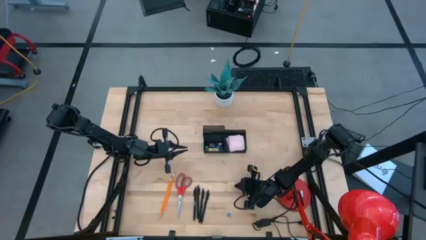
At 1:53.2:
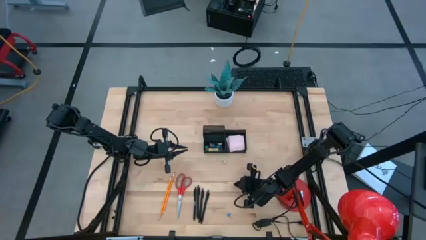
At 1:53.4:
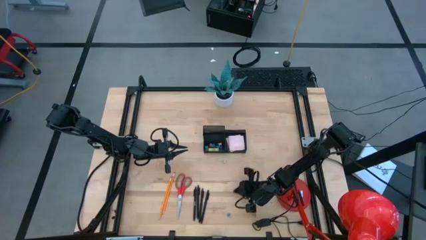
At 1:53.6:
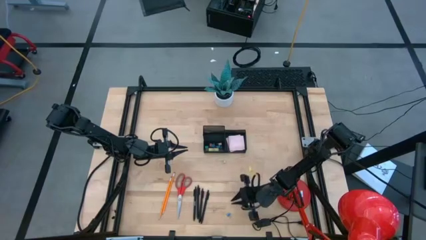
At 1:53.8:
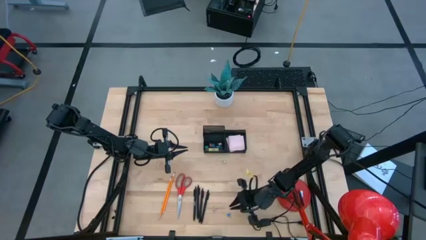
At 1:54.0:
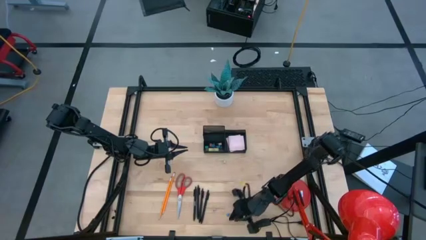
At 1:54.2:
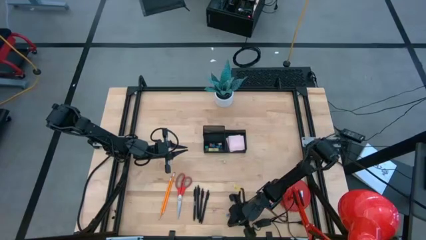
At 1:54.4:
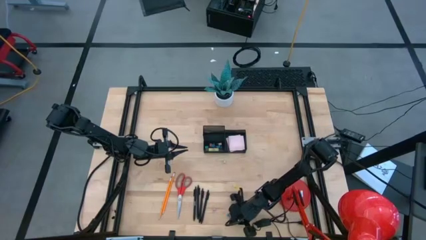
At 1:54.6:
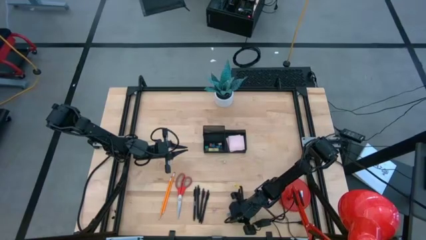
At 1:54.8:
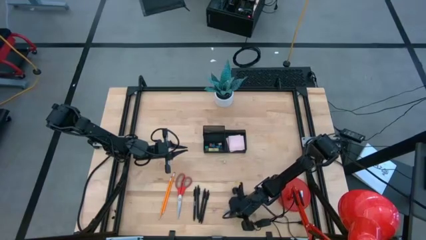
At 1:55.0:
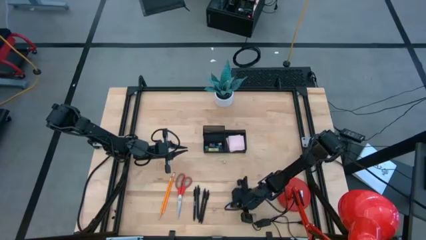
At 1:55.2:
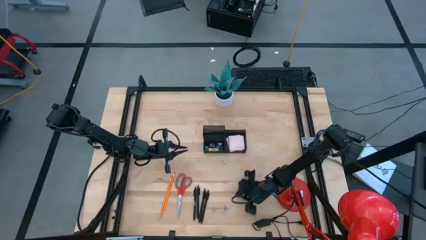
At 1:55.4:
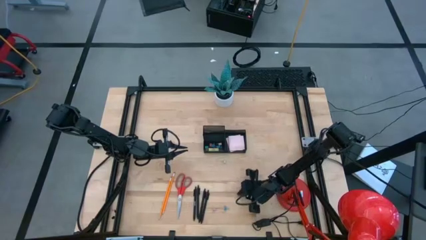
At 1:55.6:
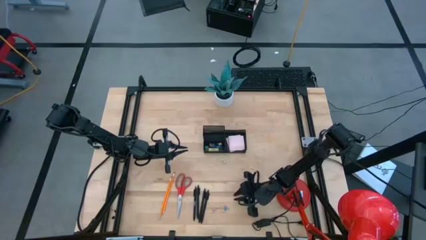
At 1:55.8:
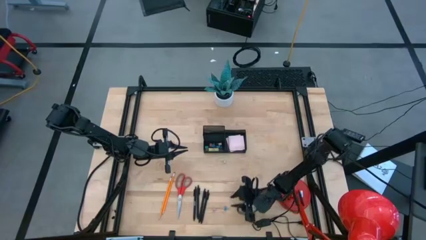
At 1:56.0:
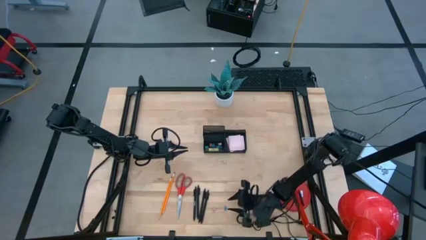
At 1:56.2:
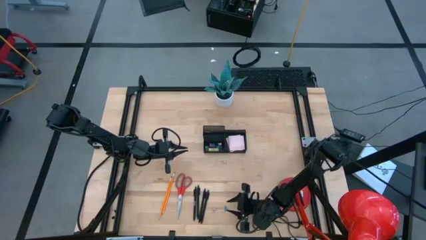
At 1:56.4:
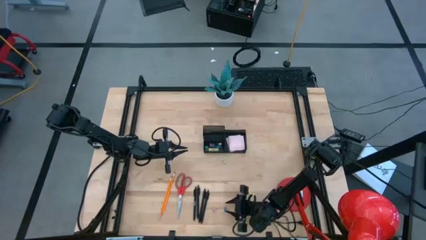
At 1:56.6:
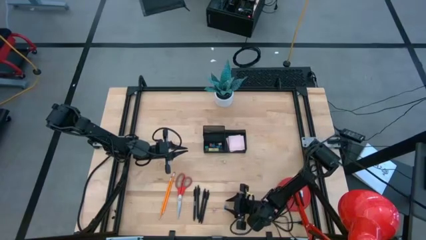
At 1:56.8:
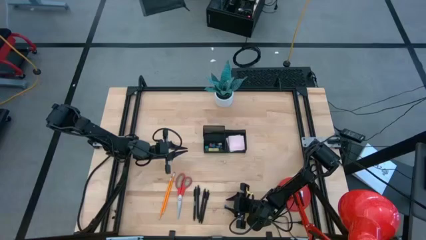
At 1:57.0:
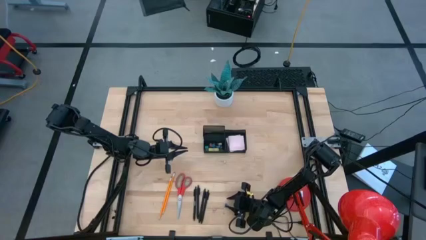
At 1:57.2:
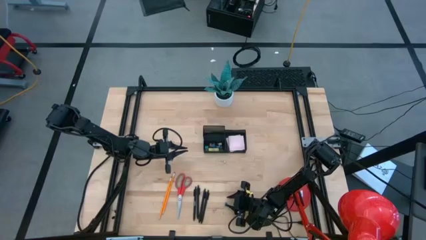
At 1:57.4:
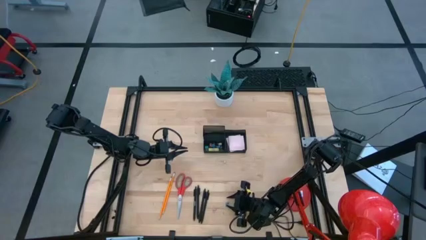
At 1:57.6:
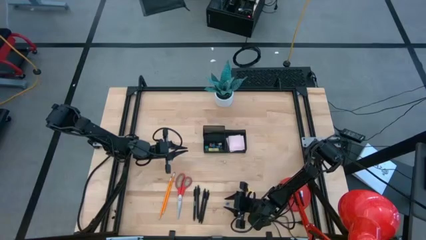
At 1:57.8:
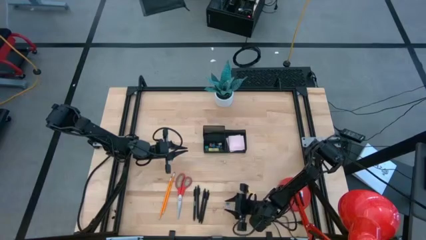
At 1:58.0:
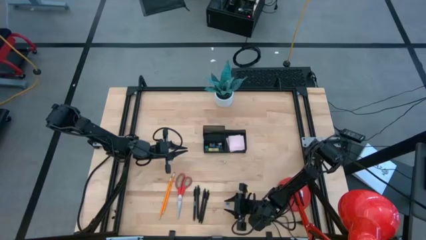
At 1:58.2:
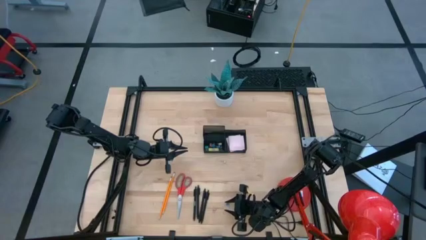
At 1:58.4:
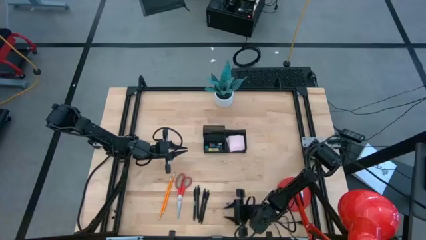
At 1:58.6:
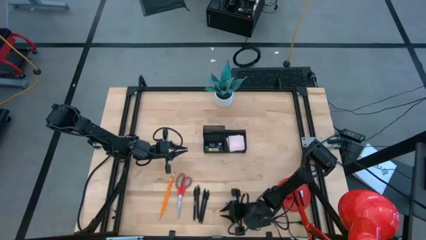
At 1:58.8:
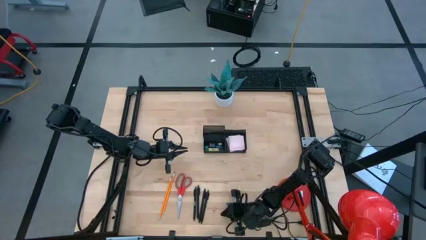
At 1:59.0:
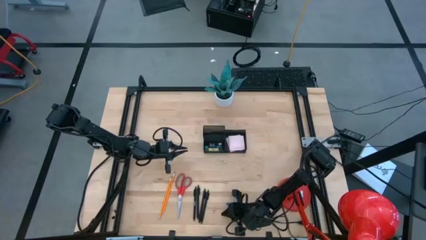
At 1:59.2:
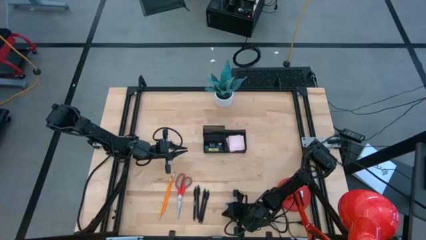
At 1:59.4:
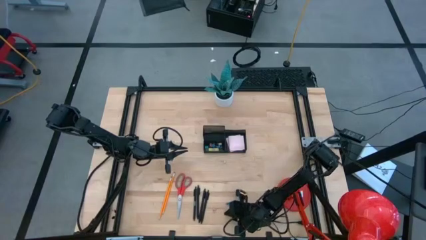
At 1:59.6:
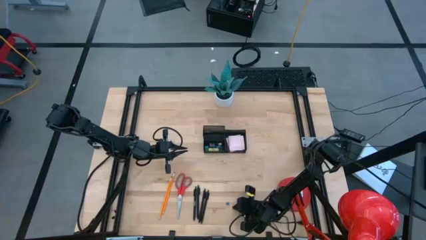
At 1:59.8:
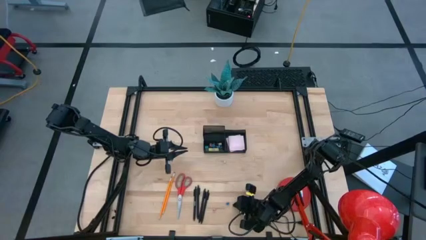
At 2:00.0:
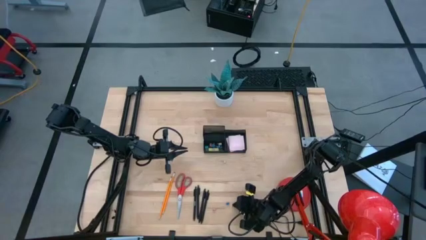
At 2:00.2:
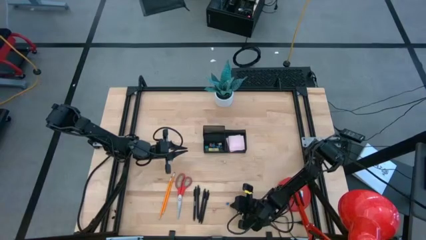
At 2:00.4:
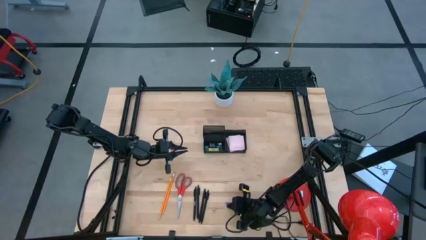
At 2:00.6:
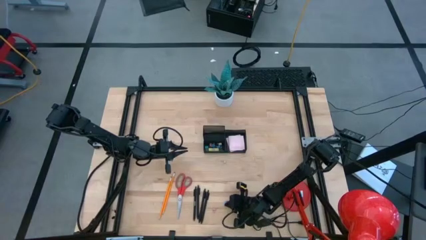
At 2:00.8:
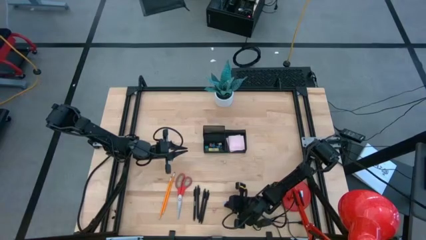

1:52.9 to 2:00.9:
Task: Pick and place office supplies into organizer
Adjust the blue binder clip

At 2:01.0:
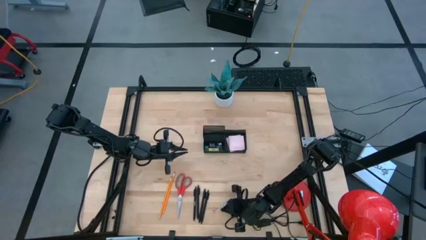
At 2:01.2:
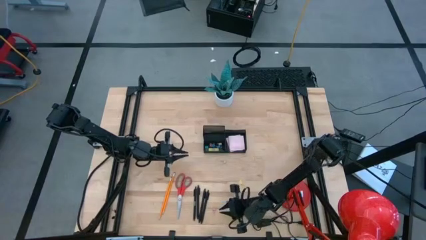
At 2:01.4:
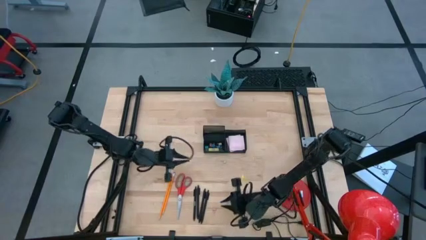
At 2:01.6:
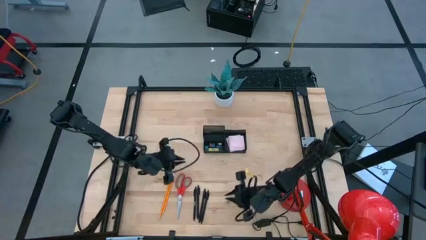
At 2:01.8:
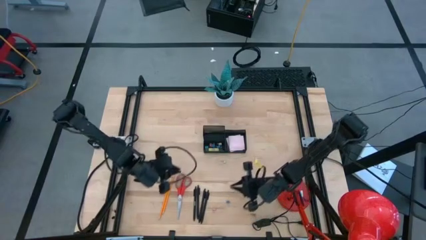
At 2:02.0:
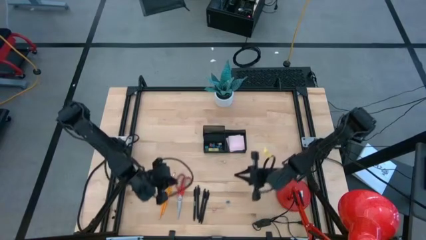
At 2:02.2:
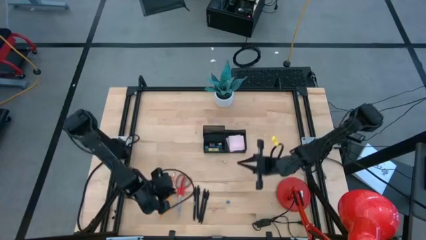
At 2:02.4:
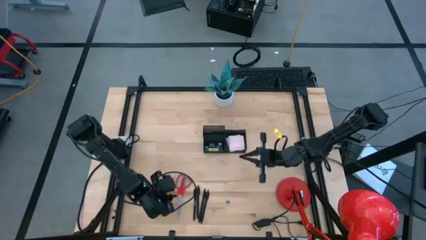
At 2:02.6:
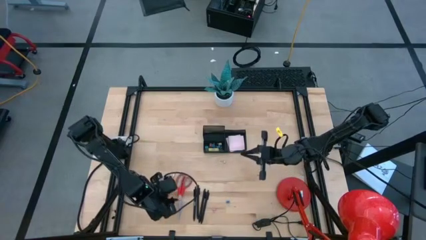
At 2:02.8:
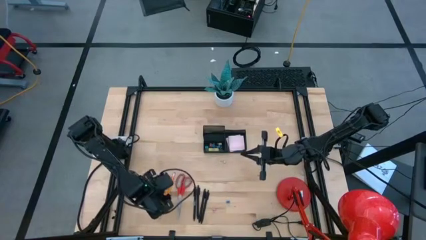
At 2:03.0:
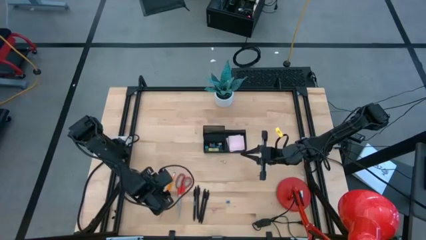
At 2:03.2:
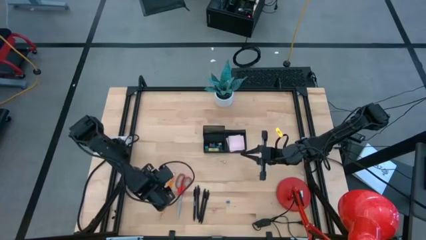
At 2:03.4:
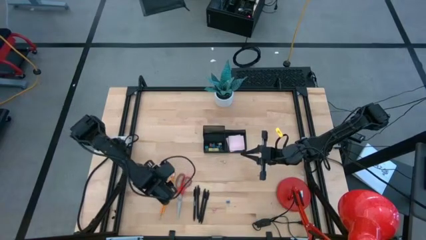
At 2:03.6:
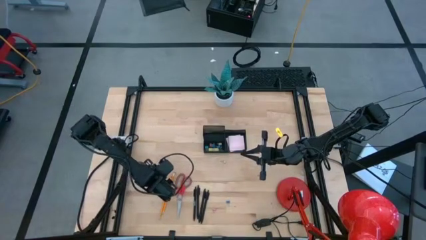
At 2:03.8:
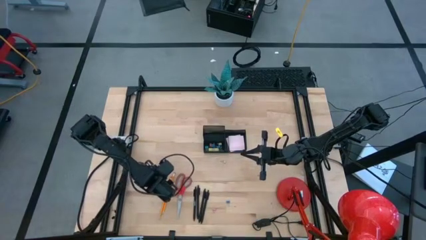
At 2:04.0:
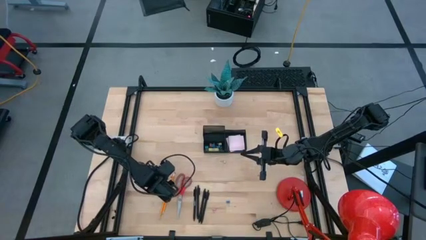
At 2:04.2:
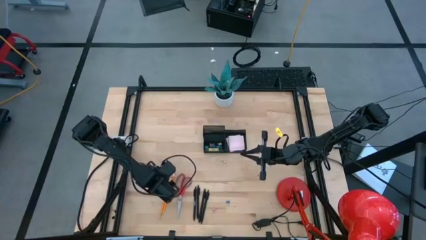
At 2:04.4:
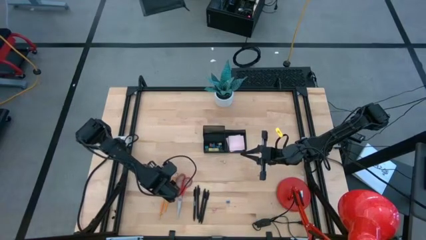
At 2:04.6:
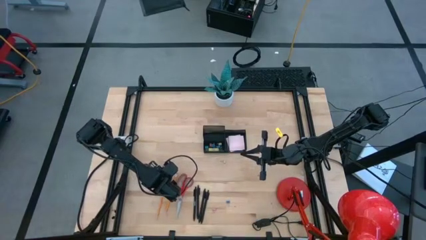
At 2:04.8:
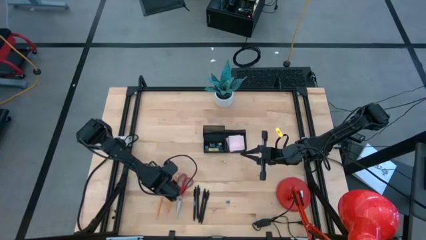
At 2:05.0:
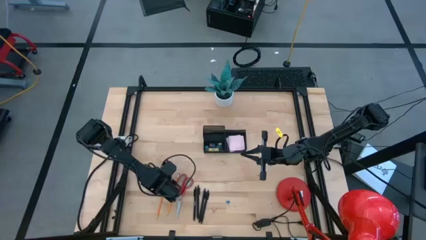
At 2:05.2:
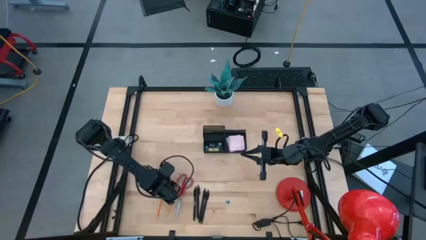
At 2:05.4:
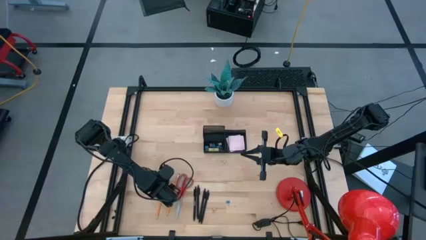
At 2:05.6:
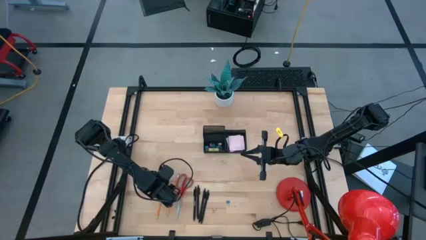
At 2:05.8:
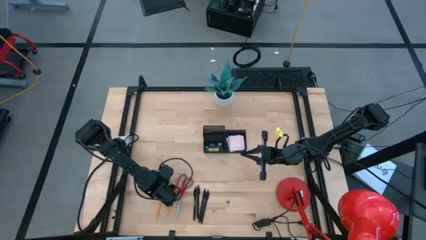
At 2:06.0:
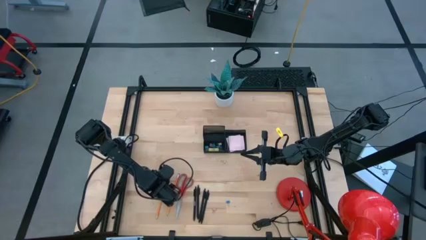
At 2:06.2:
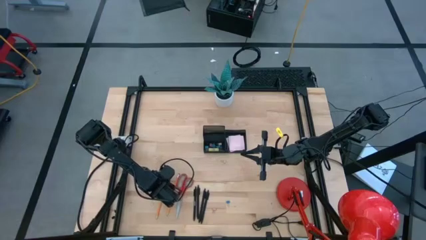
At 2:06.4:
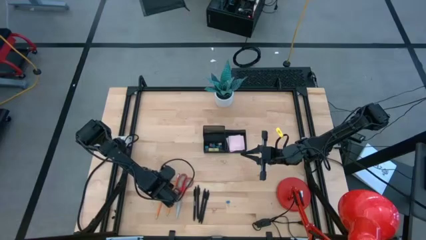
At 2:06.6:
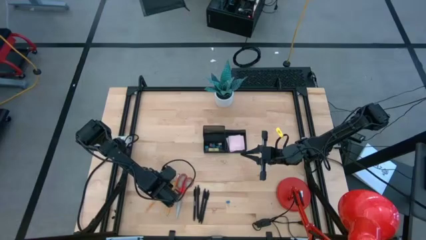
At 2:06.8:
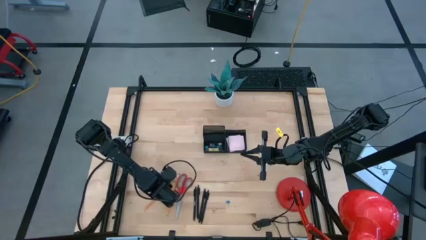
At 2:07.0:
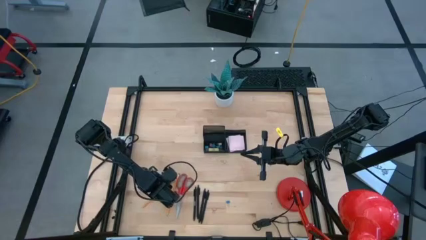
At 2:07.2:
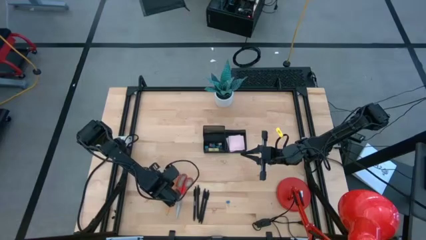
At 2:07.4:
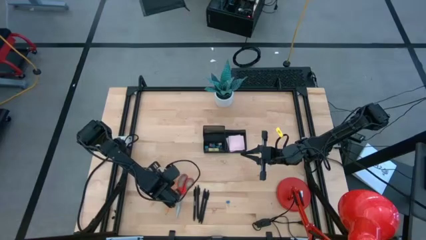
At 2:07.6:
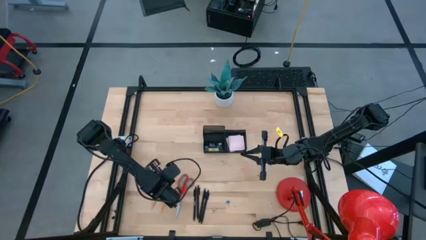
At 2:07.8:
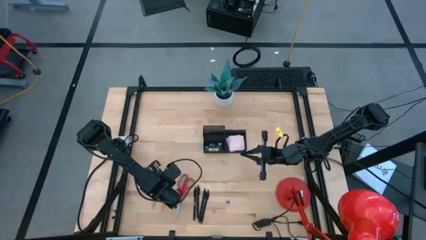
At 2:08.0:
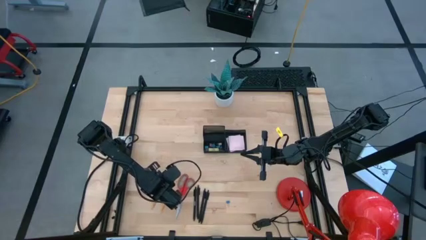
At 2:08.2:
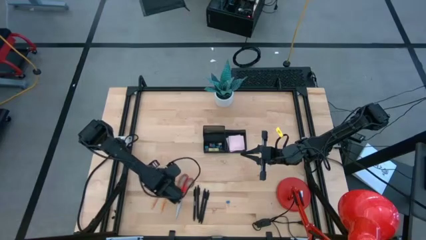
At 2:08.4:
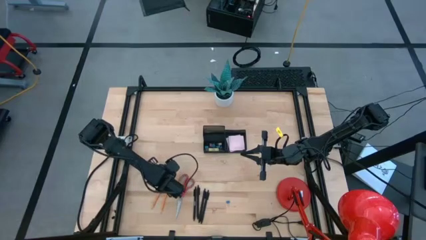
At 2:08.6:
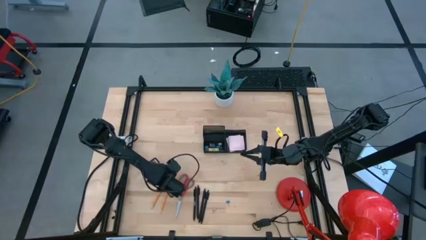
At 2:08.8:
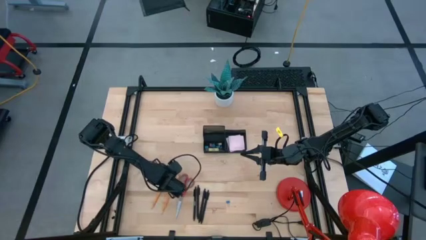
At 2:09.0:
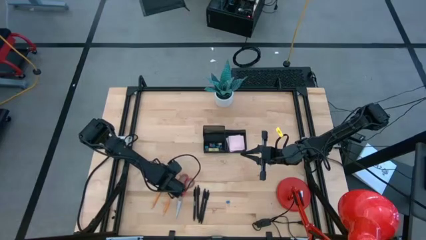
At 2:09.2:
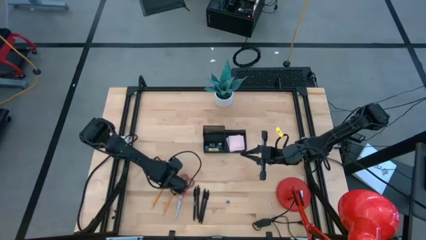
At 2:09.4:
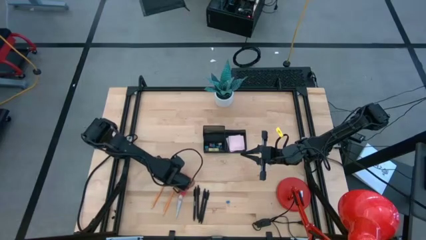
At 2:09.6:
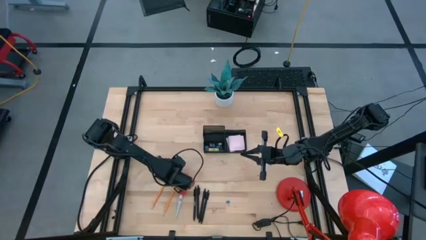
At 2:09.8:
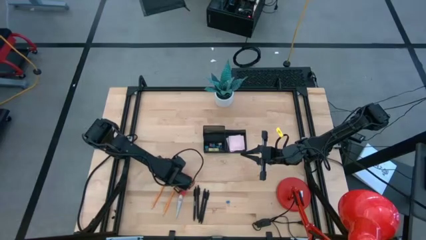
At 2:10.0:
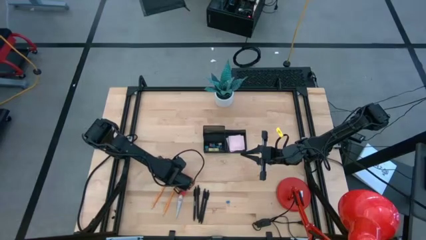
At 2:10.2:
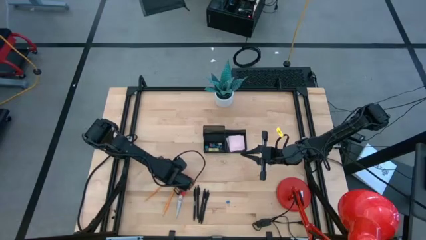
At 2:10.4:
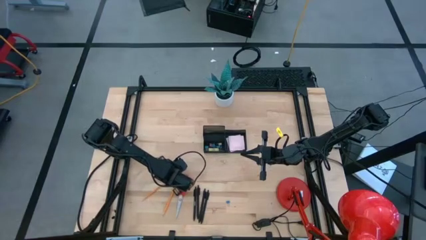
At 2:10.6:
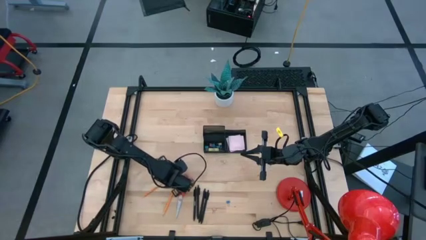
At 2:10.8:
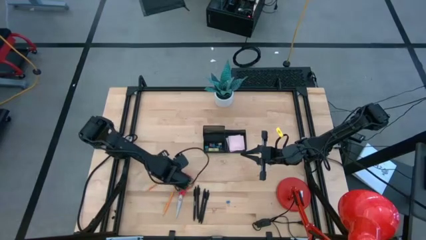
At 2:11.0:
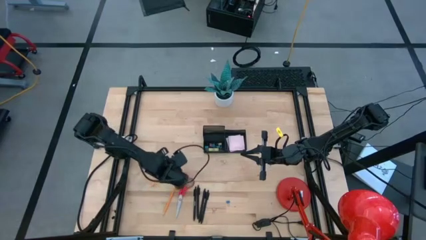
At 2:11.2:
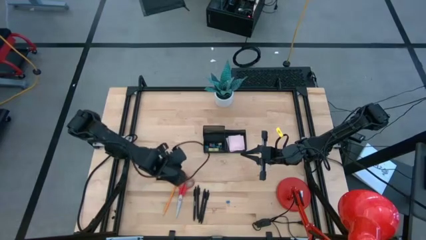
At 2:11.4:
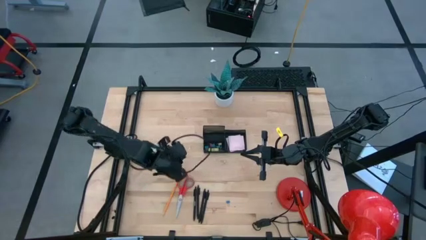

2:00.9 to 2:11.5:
Put the left orange pencil into the black desk organizer
